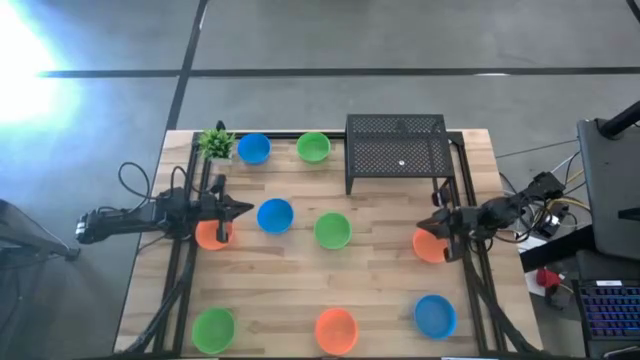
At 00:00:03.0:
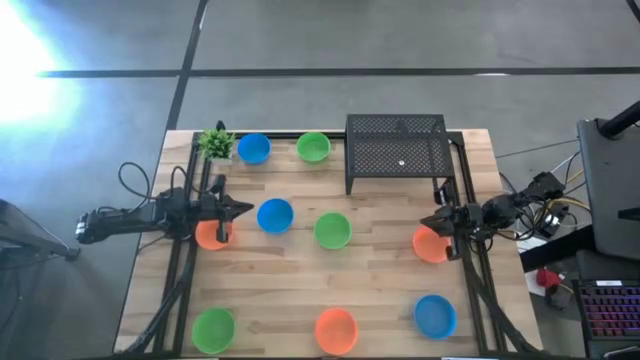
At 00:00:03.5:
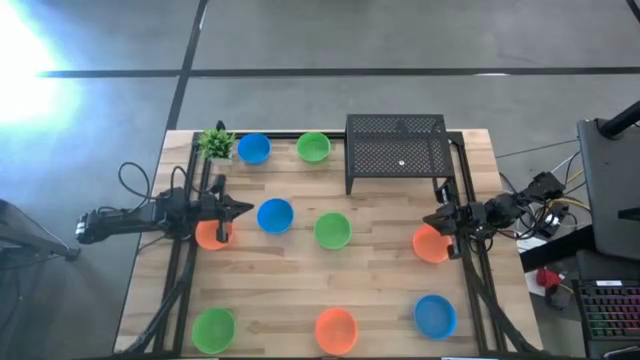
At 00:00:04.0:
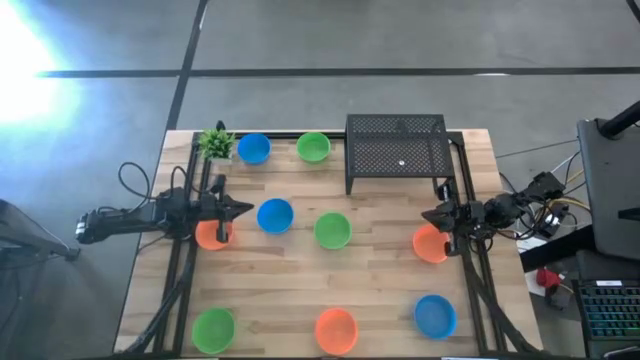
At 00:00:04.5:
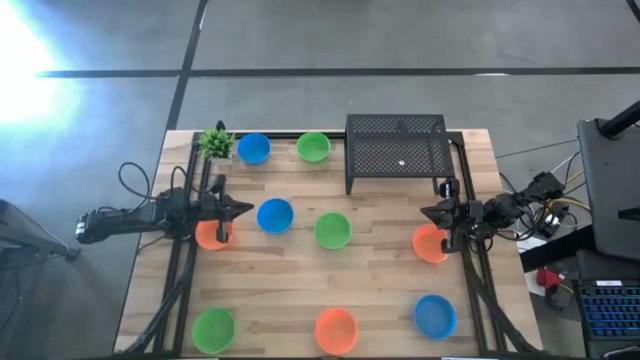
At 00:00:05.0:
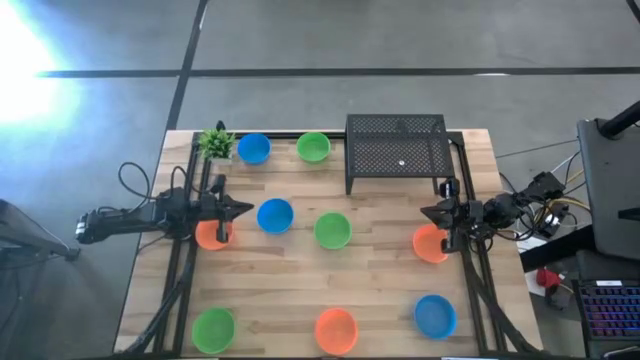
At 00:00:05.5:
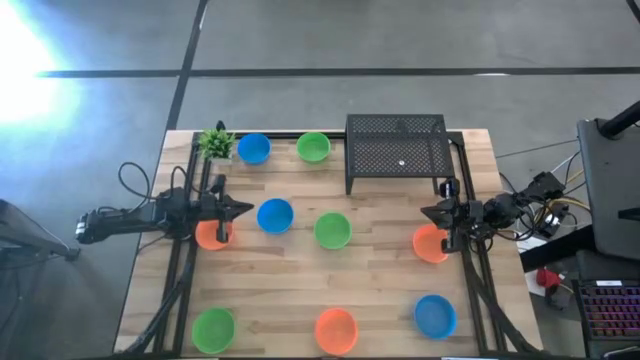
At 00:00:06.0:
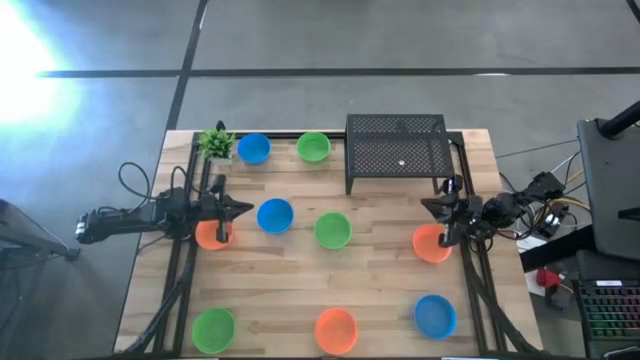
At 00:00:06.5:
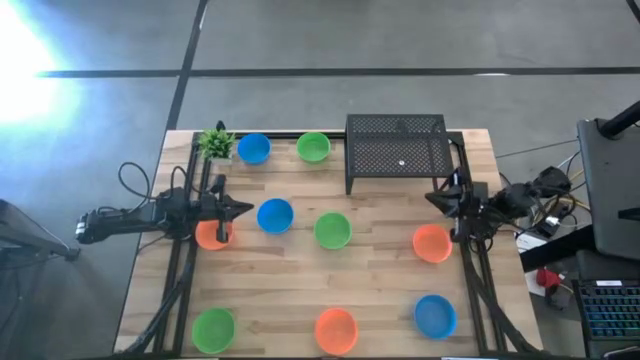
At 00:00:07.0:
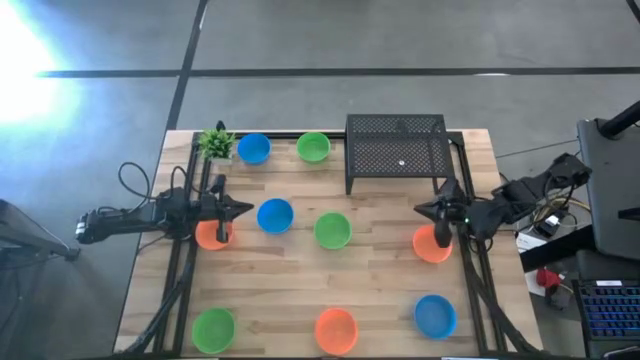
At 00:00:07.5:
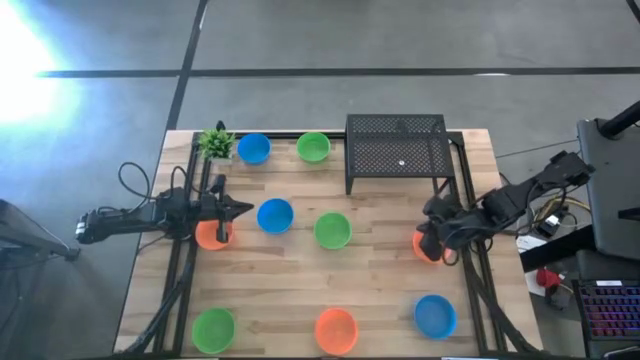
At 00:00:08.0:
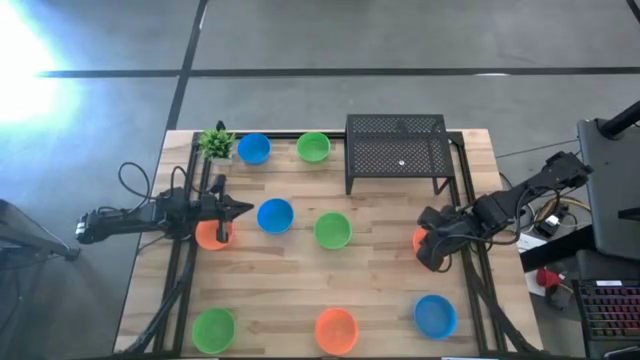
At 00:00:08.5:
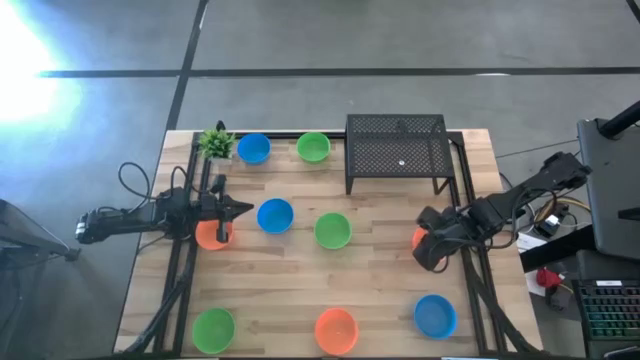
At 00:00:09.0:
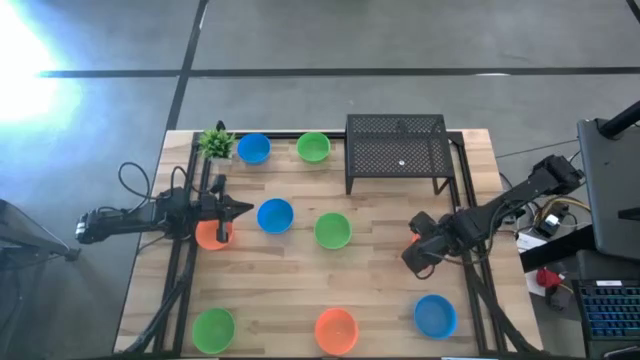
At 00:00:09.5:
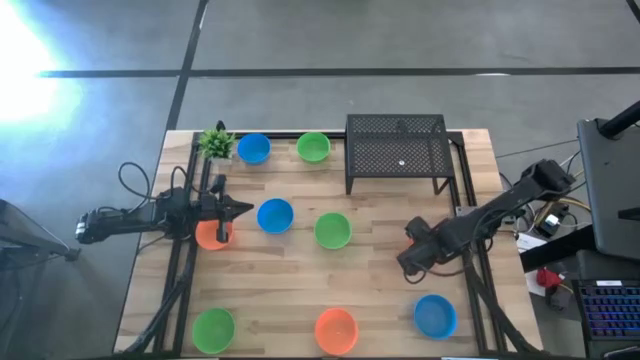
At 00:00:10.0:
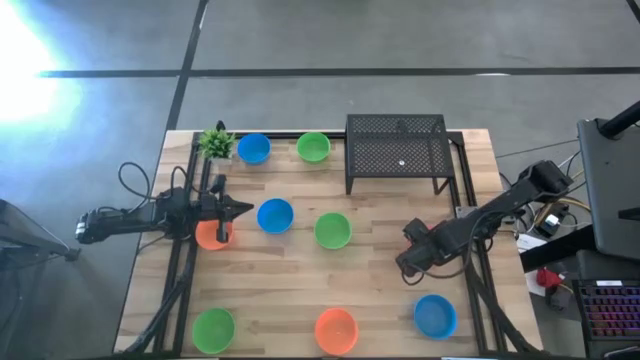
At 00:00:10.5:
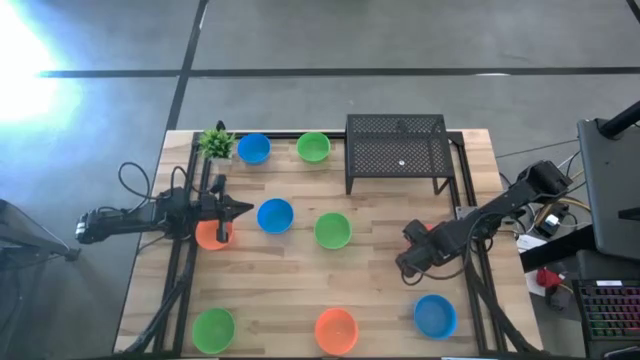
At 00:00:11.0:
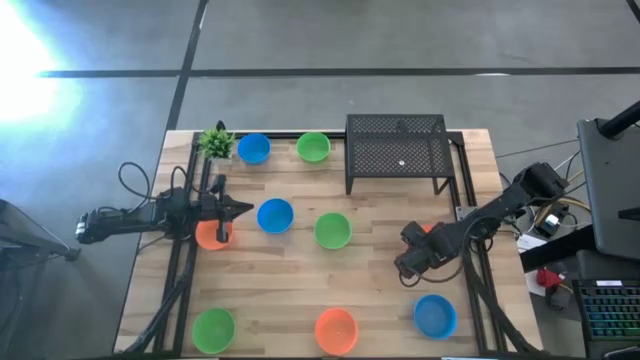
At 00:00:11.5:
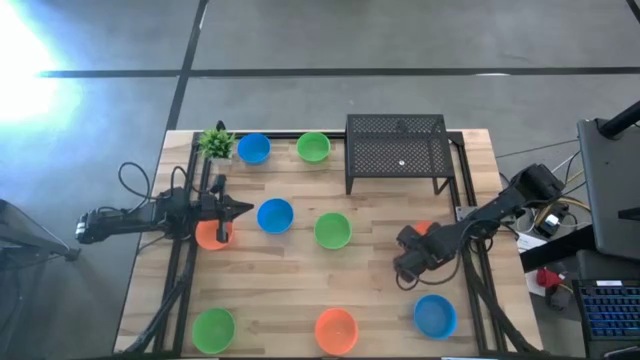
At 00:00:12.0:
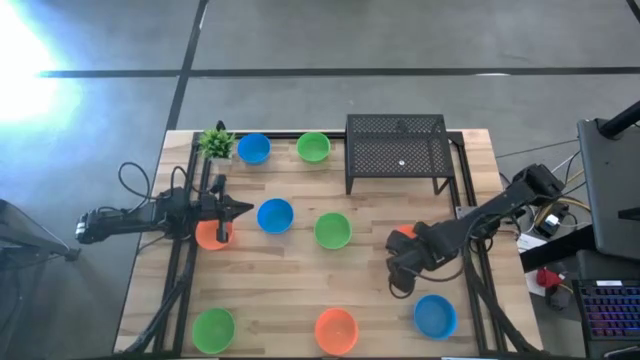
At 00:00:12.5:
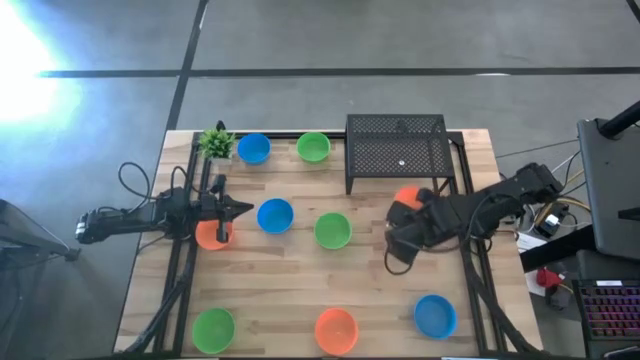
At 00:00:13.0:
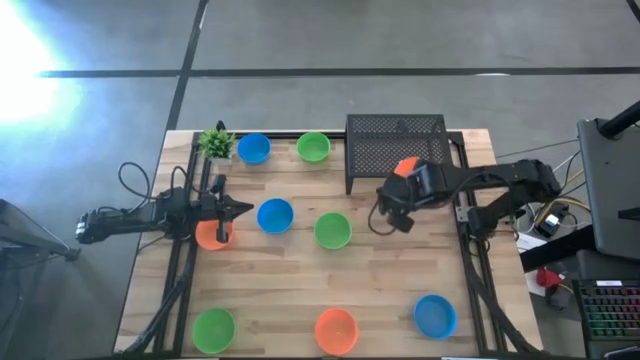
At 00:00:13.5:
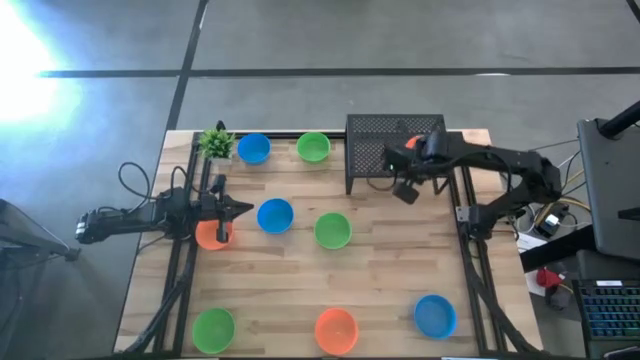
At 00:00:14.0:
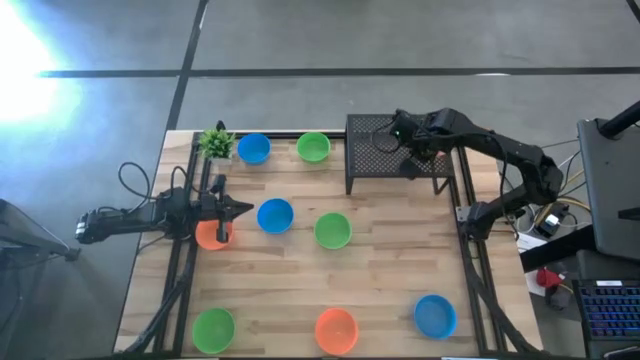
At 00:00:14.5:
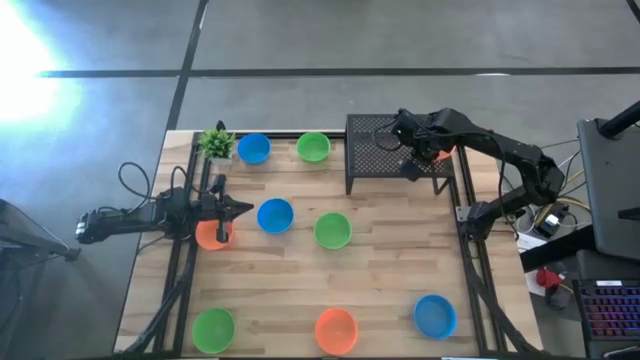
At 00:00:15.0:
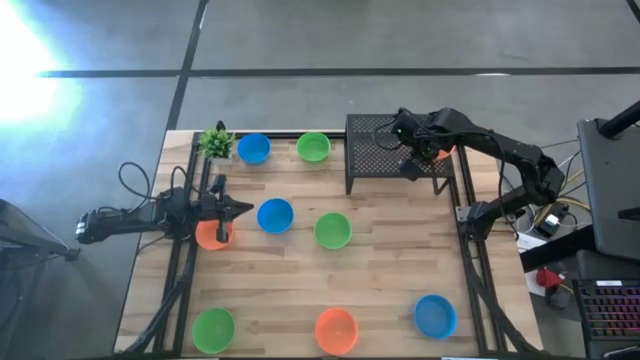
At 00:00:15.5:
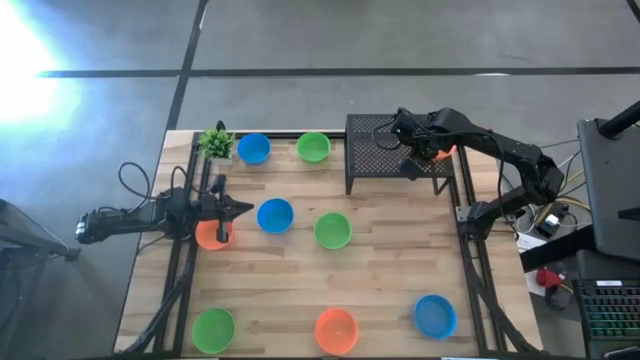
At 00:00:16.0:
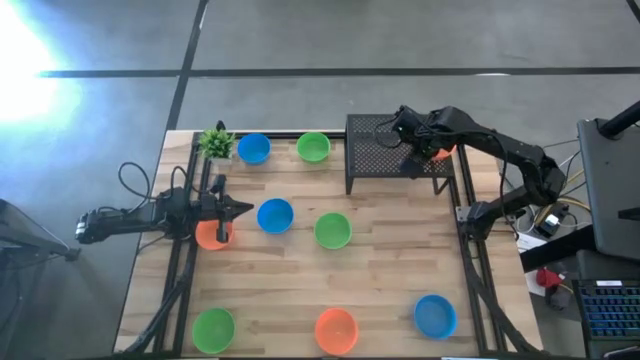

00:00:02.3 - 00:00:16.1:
Task: Pick & Place Mini bowls
Put the top right orange bowl on the shelf

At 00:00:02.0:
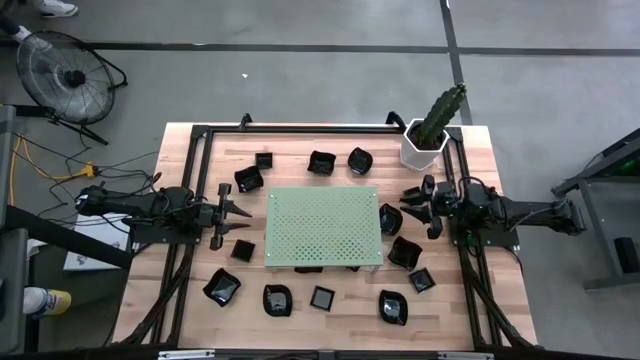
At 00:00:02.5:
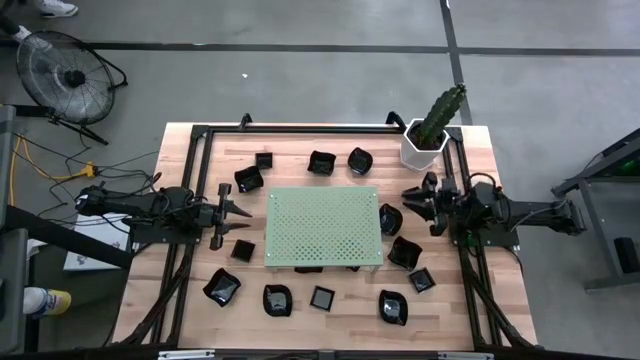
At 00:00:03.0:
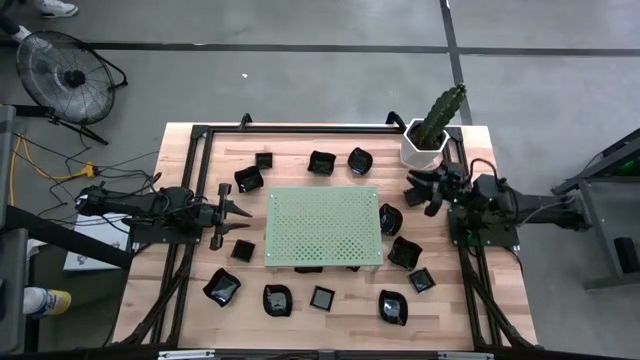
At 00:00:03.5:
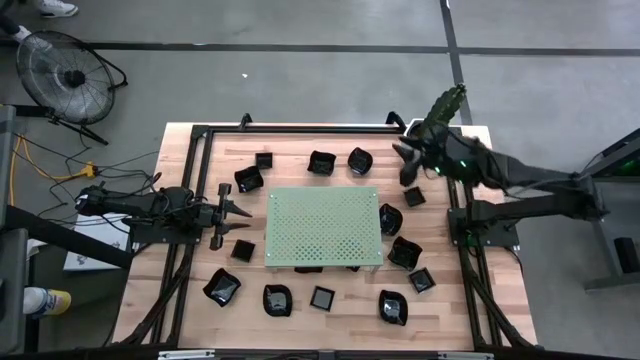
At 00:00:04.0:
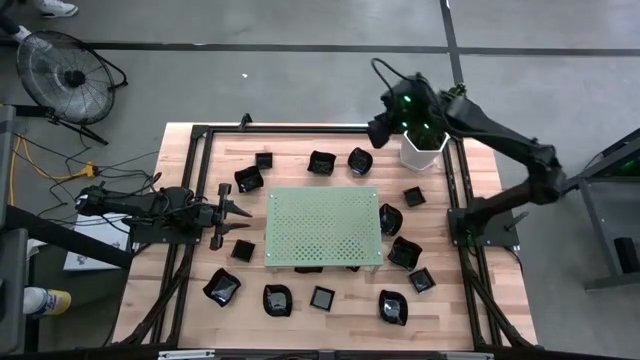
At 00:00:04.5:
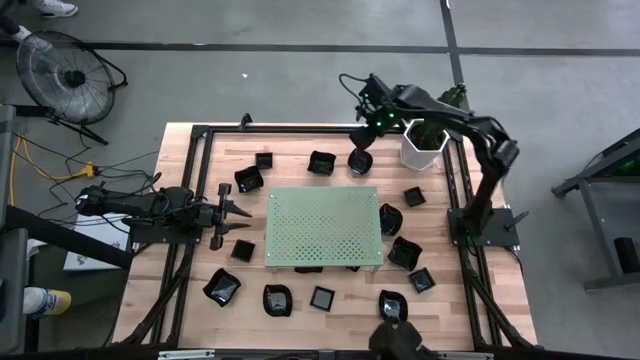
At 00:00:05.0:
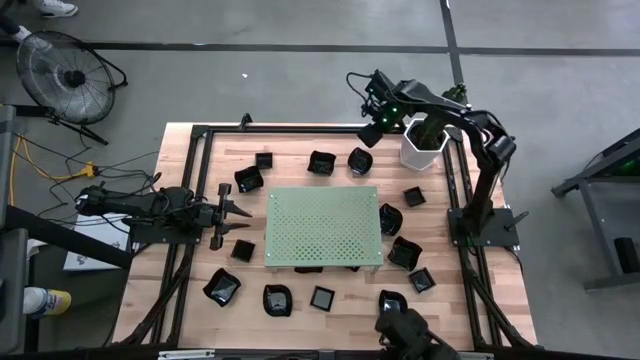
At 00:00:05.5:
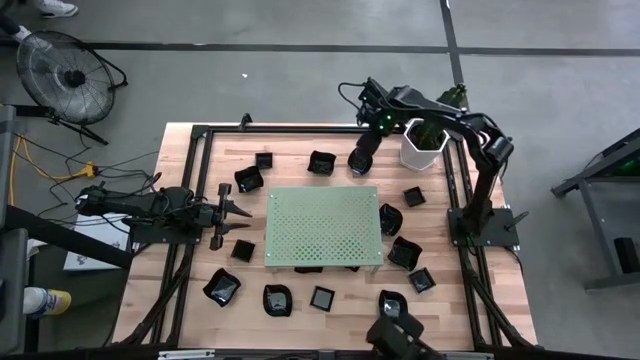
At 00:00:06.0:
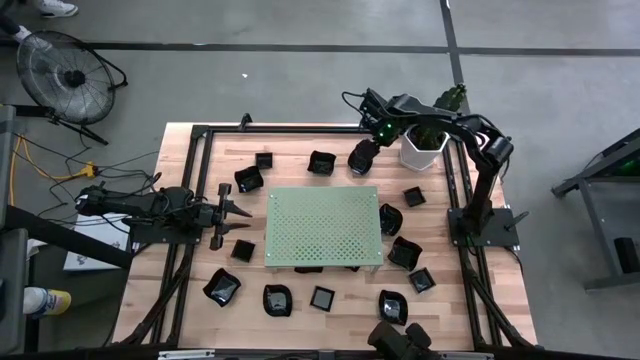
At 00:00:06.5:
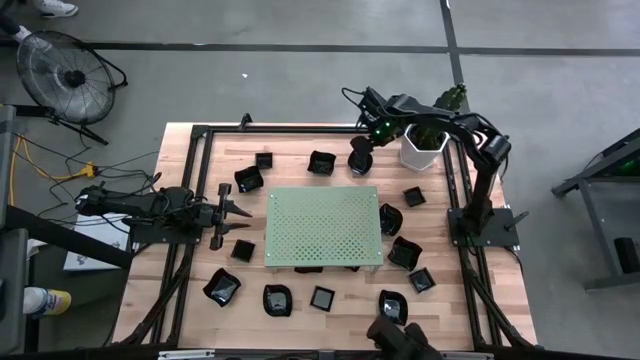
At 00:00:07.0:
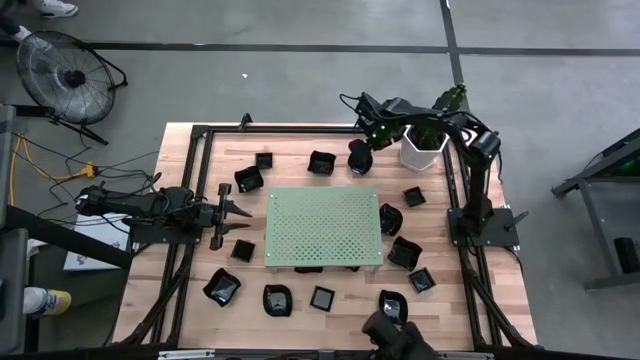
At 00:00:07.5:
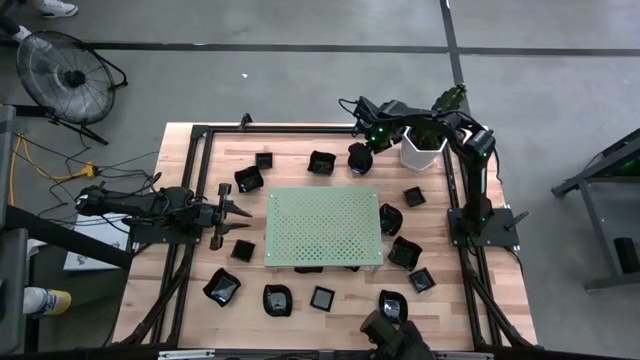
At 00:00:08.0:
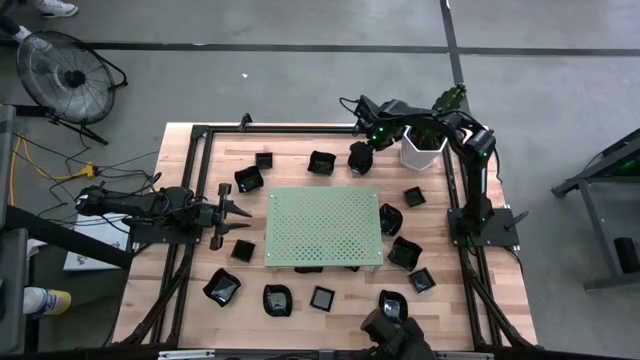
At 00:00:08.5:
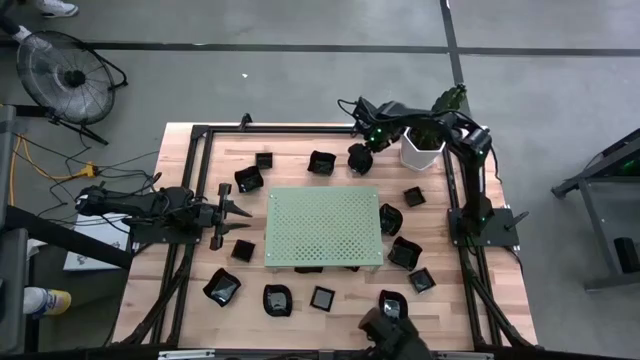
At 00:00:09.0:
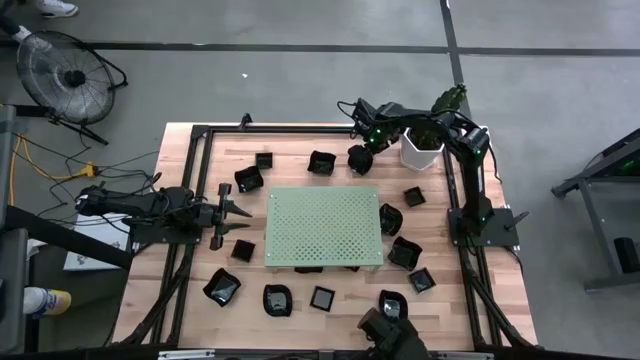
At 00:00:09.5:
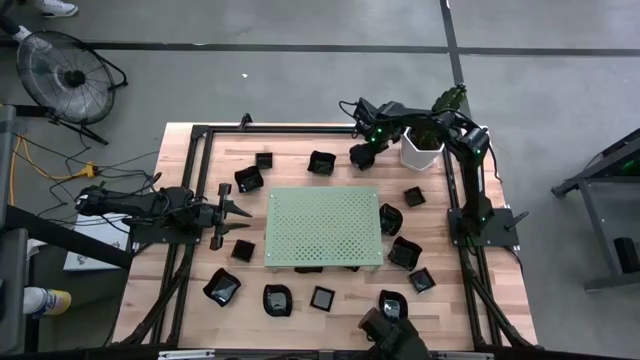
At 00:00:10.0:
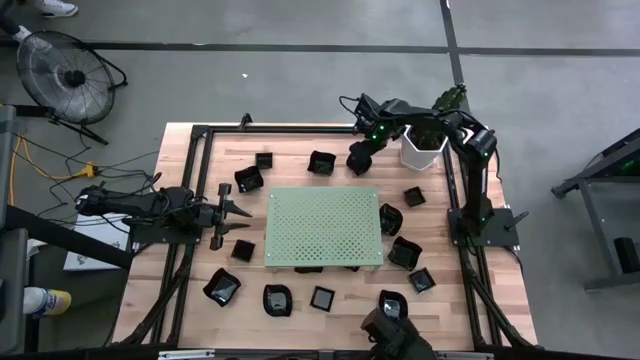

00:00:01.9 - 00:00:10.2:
Task: Pick & Place Mini shaped plates
Put the black leaf shaped bowl on the shelf
